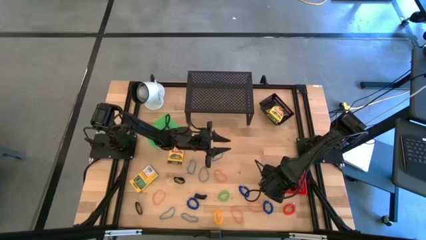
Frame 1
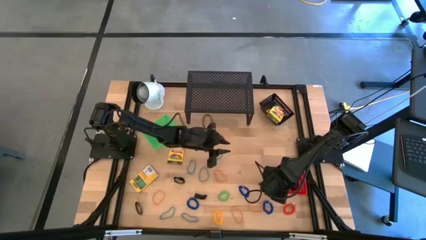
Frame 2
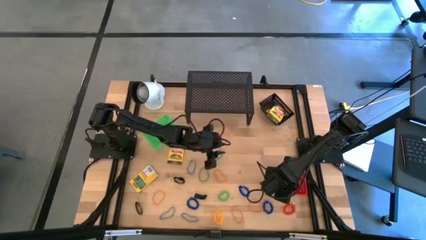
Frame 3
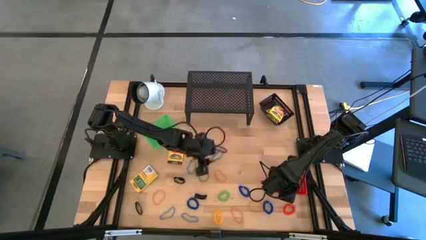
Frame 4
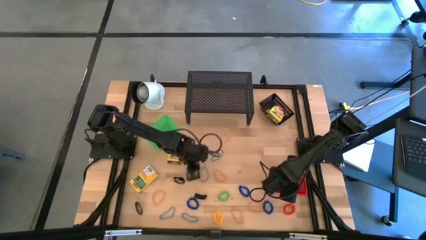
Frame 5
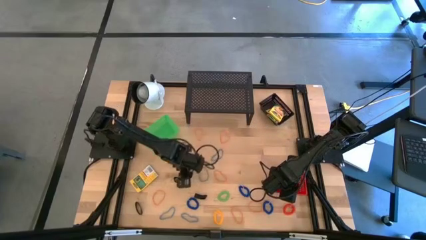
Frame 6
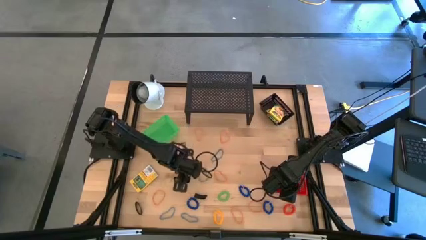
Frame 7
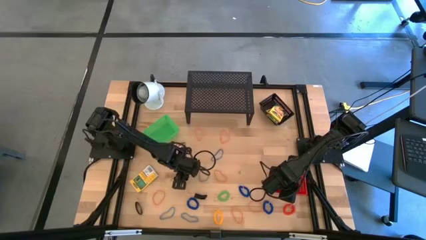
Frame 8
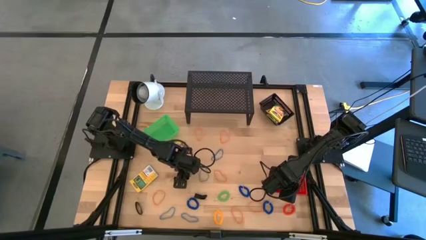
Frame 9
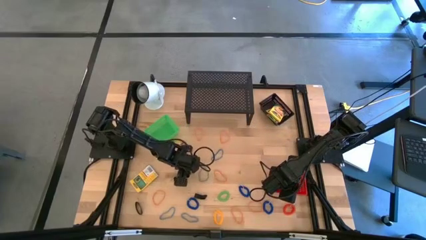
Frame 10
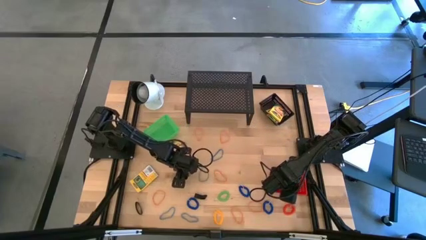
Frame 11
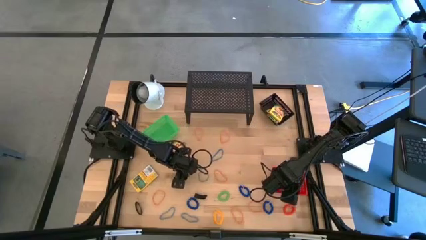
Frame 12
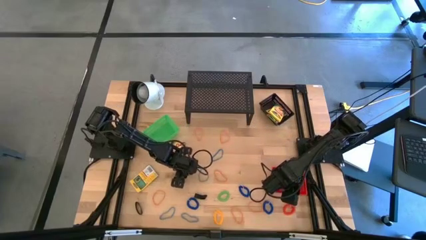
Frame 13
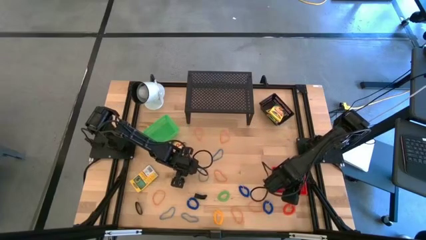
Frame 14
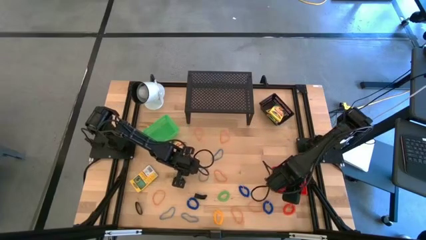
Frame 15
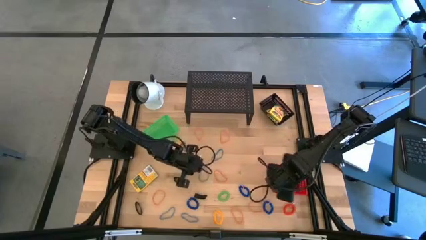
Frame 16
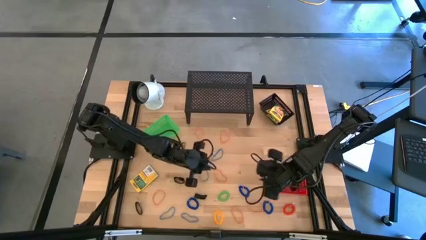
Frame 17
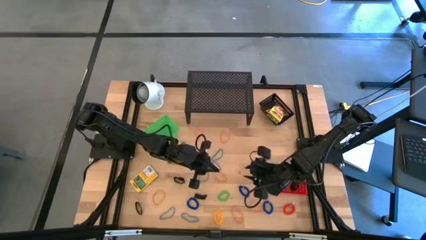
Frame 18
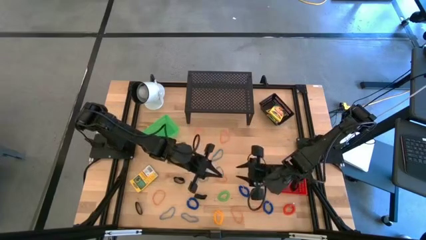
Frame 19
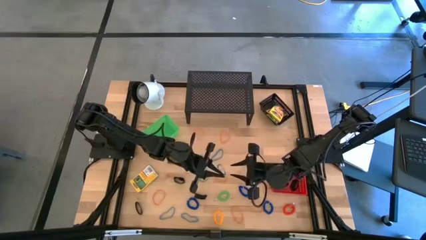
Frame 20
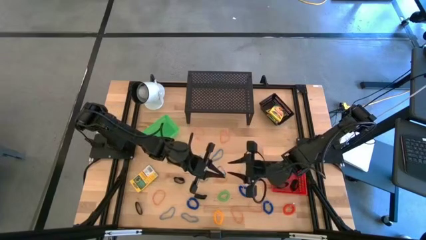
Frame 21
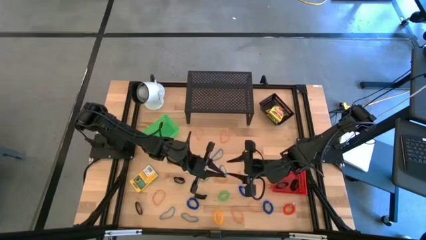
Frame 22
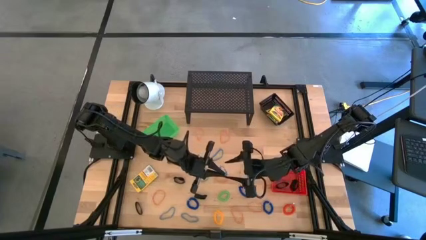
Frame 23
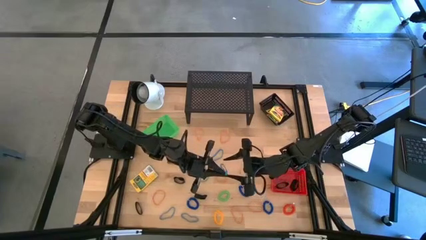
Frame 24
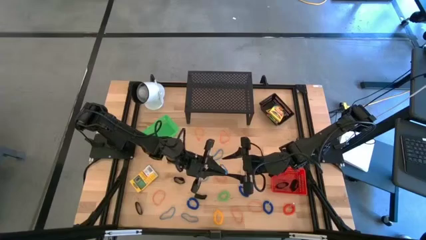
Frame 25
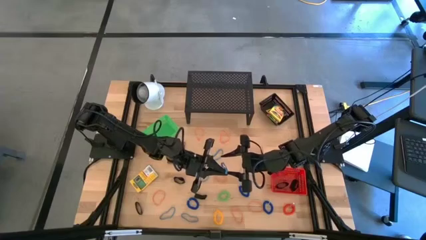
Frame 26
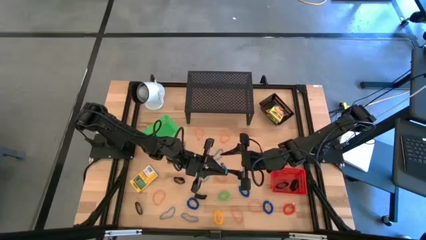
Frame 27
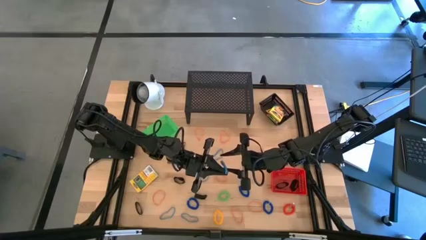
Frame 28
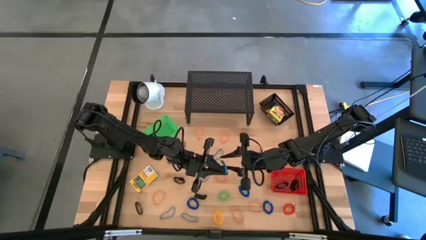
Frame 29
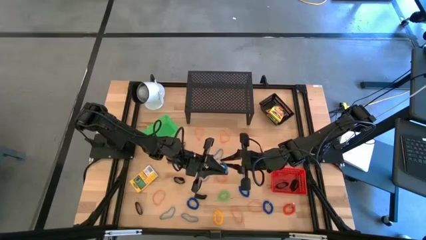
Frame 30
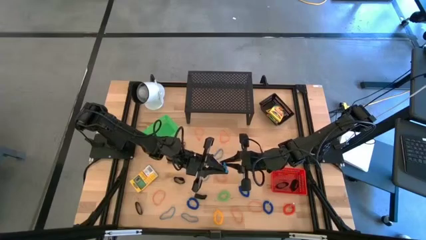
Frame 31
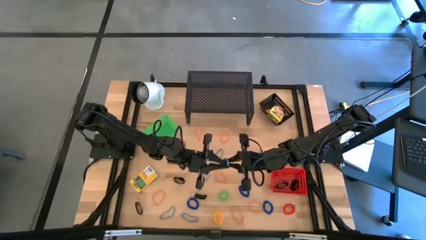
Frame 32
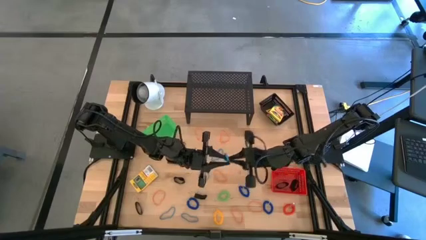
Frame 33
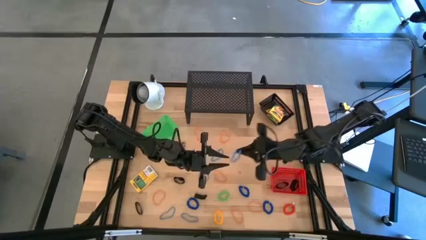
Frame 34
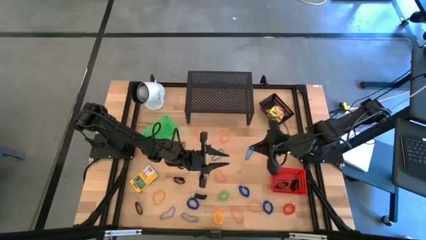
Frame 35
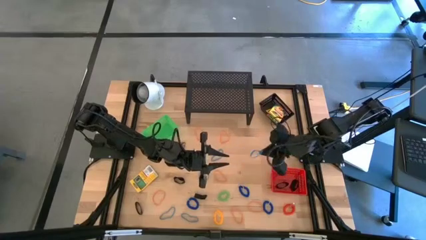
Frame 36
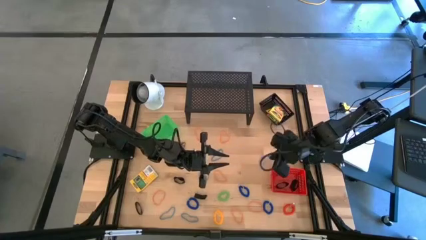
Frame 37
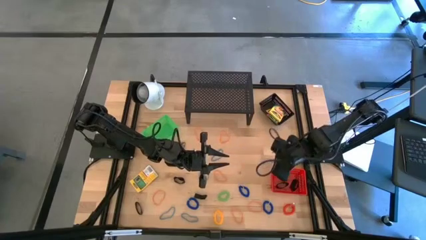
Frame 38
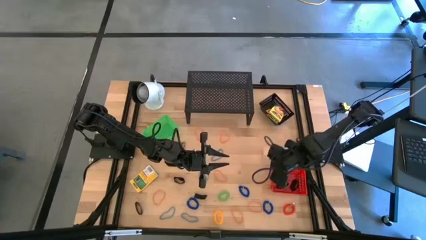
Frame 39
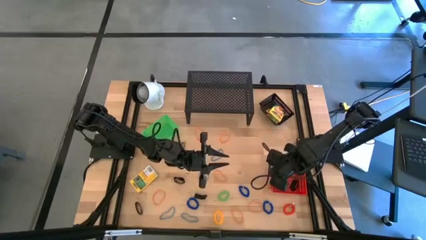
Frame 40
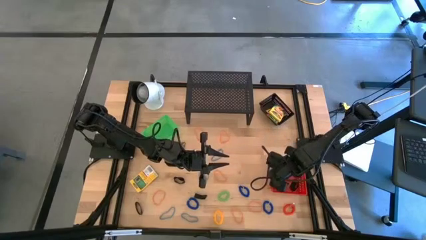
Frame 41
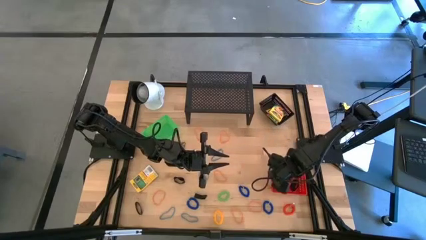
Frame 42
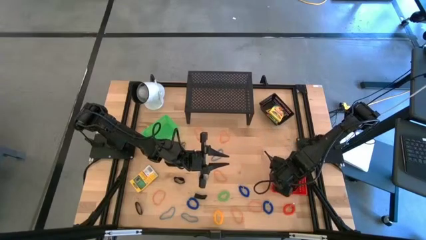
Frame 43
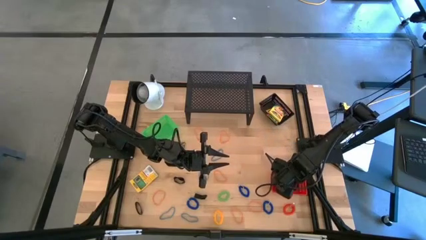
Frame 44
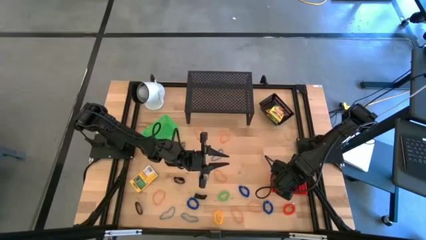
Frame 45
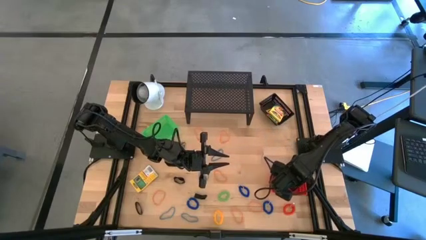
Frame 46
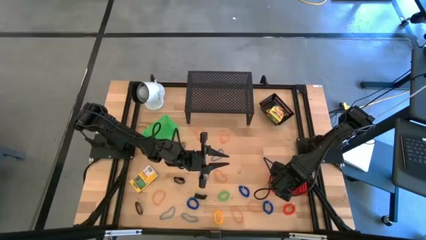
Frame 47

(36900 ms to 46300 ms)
Task: Pick & Place Office Desk Supplies
Put the blue rubber band into the red bin
